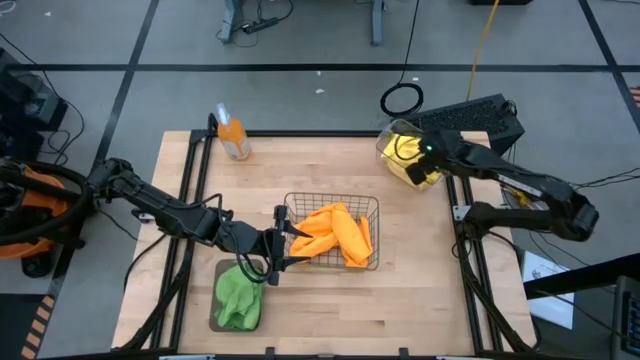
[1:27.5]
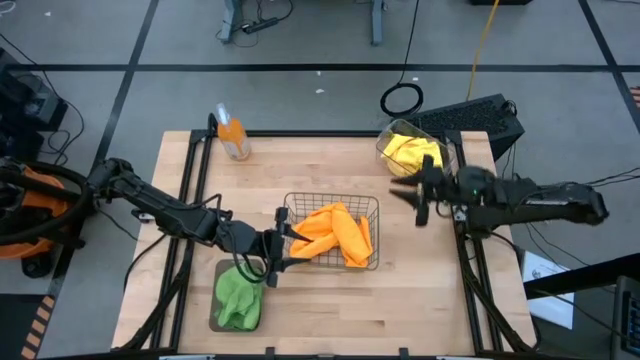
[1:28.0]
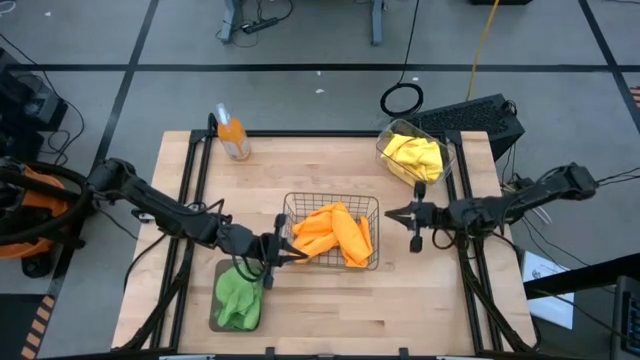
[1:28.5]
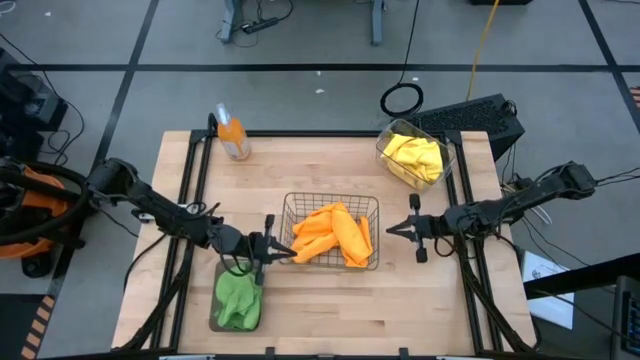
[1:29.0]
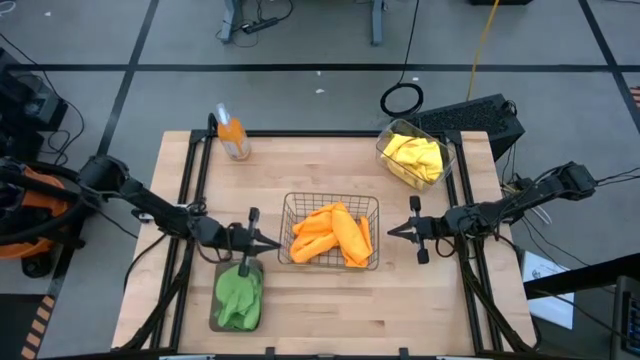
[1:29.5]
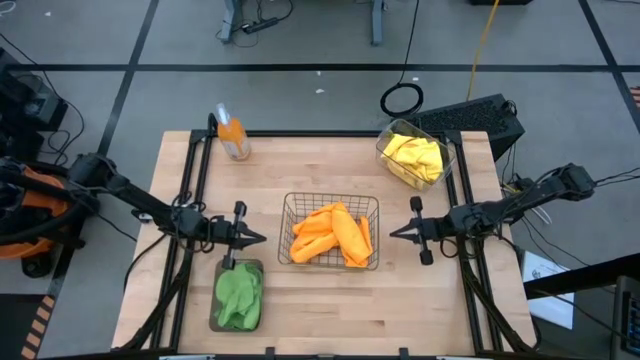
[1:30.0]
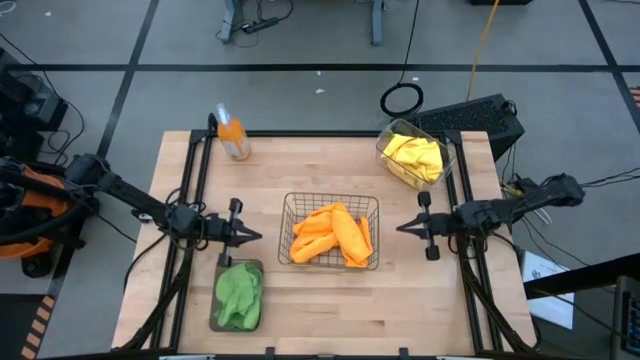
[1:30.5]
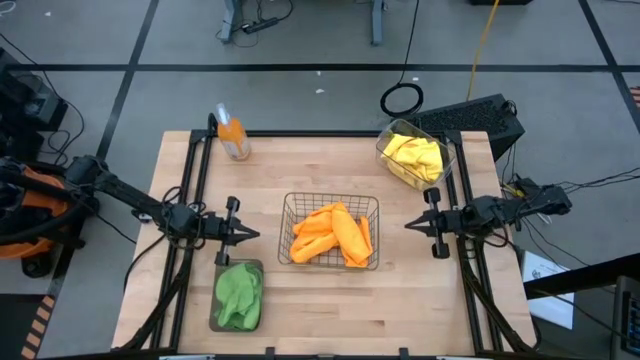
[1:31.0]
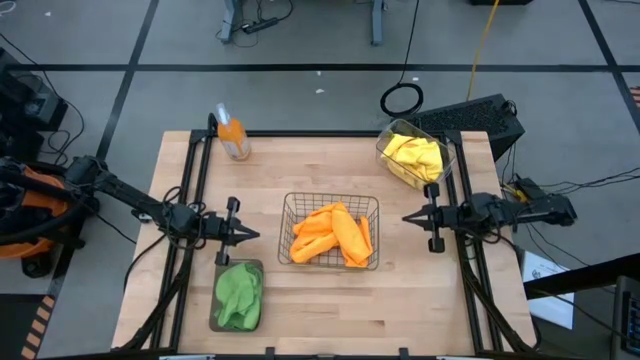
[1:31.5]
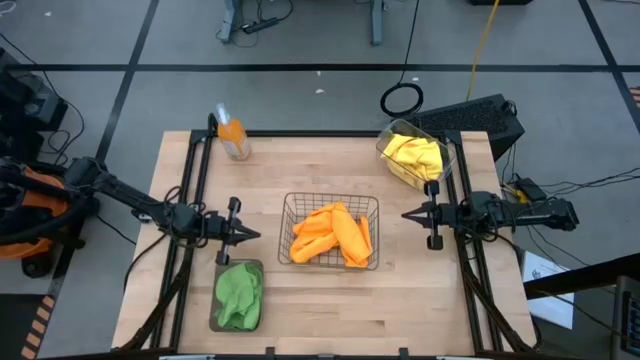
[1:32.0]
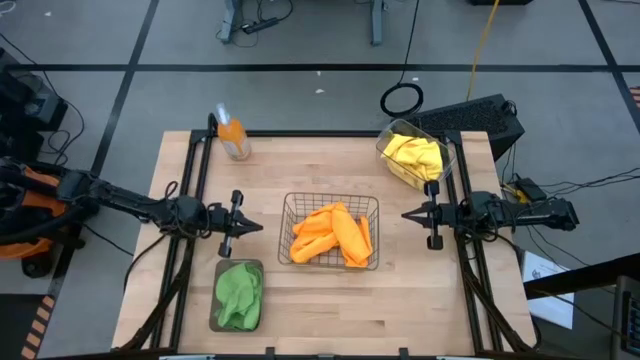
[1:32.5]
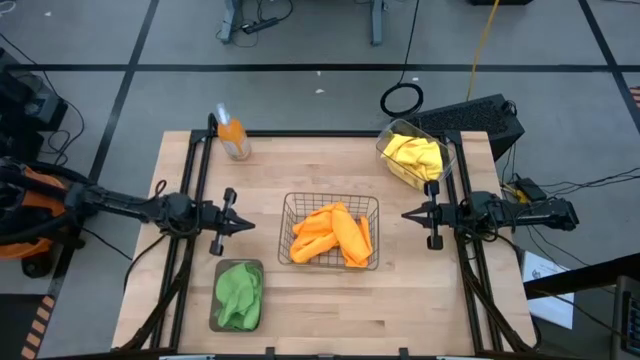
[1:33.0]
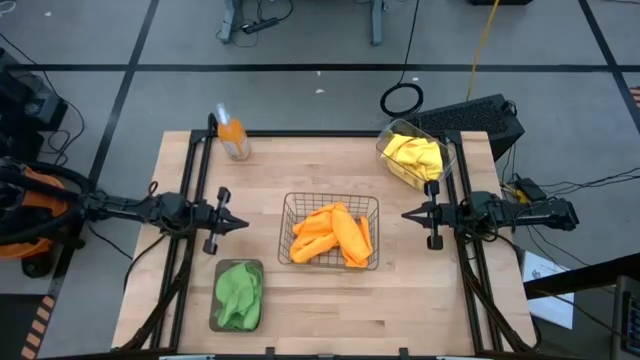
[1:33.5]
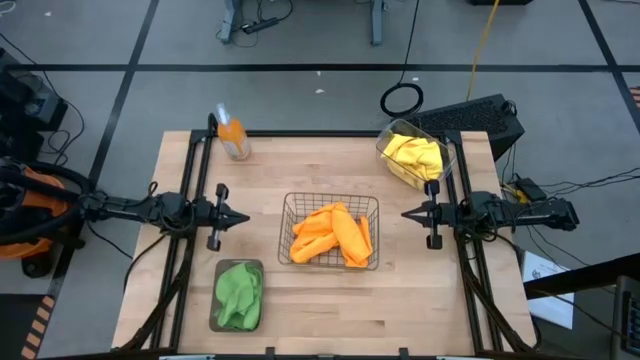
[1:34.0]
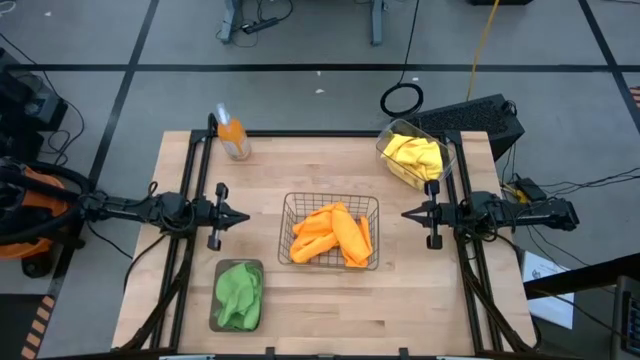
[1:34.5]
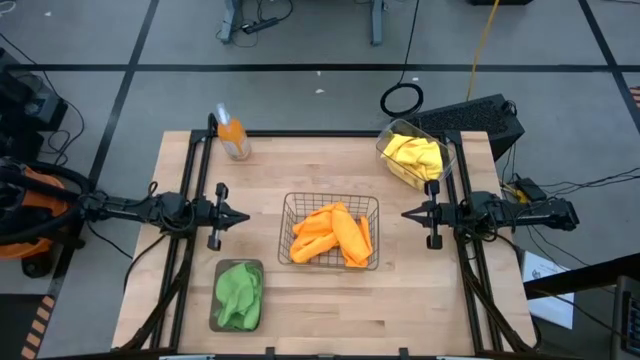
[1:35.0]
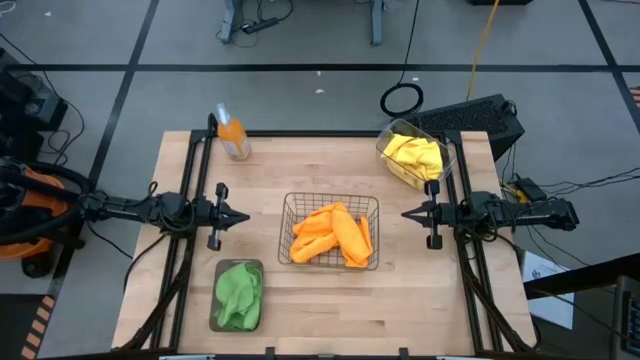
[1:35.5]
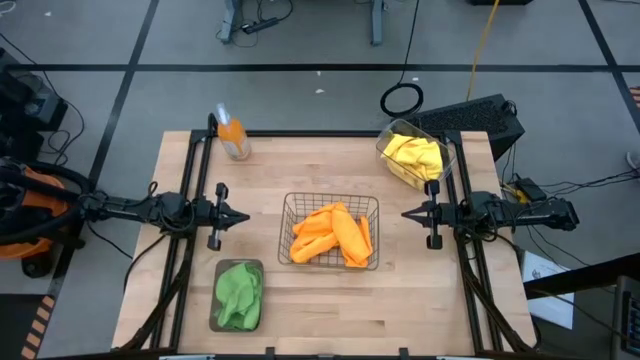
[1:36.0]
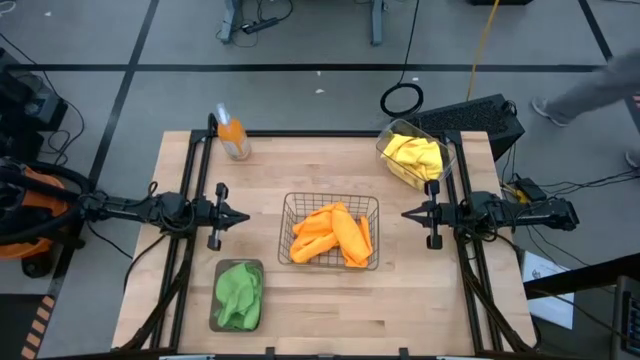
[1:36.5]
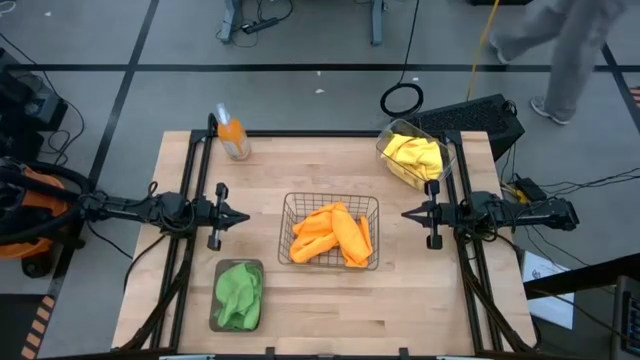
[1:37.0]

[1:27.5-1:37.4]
Task: Sort microfiber towel by color & place in baskets
Return to Home Position

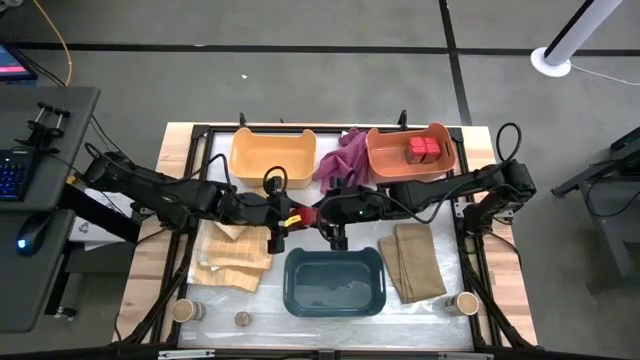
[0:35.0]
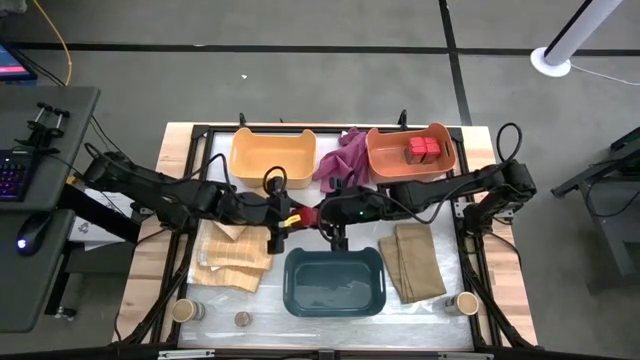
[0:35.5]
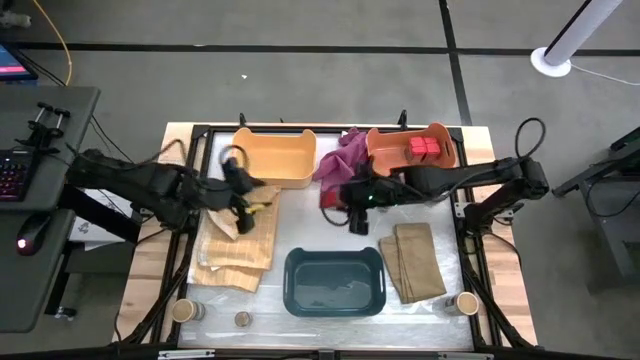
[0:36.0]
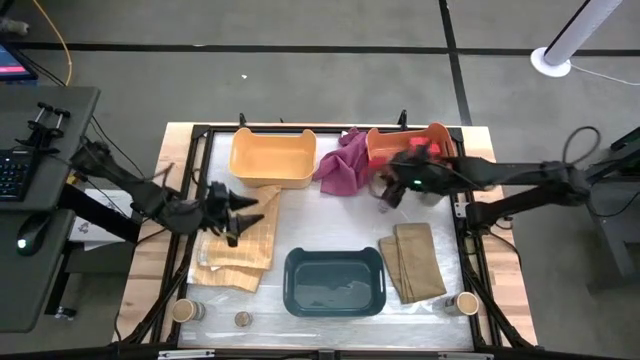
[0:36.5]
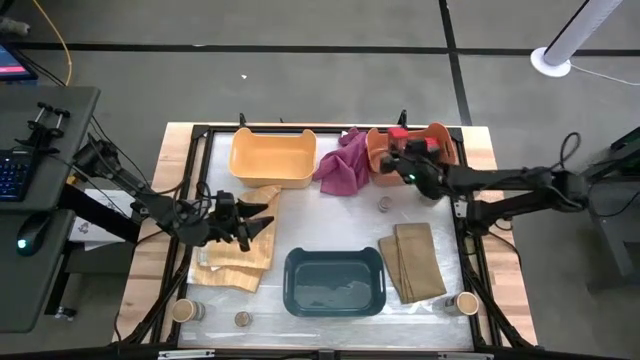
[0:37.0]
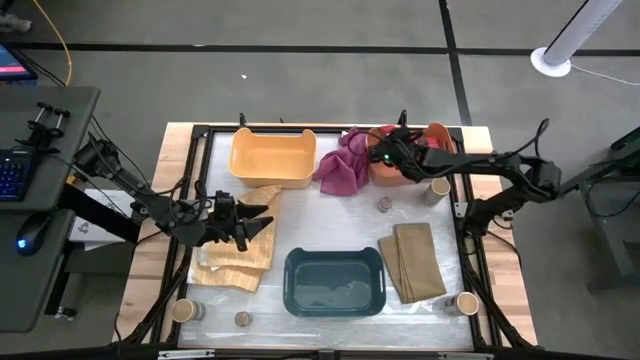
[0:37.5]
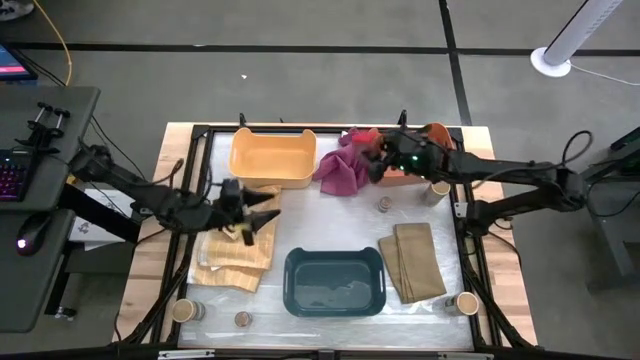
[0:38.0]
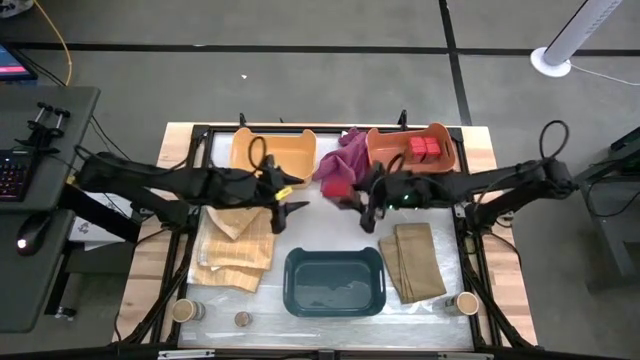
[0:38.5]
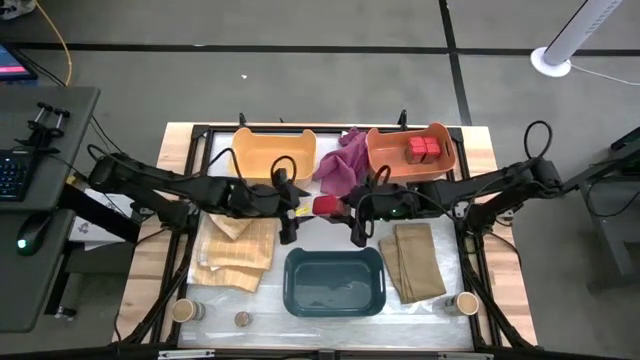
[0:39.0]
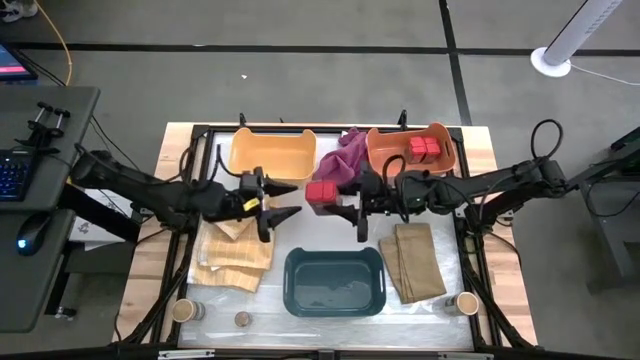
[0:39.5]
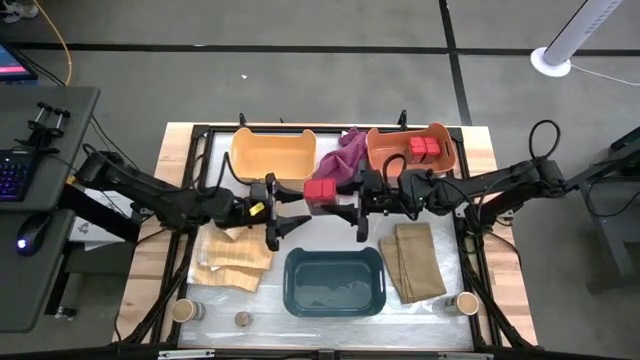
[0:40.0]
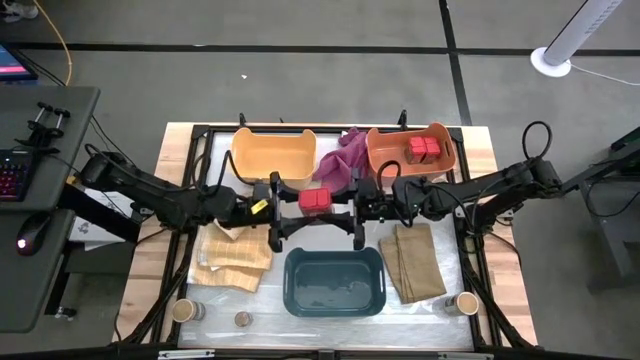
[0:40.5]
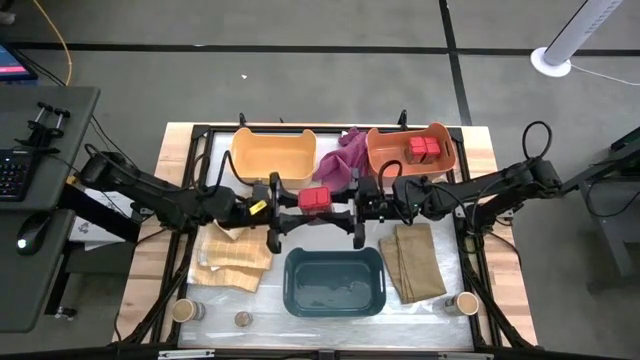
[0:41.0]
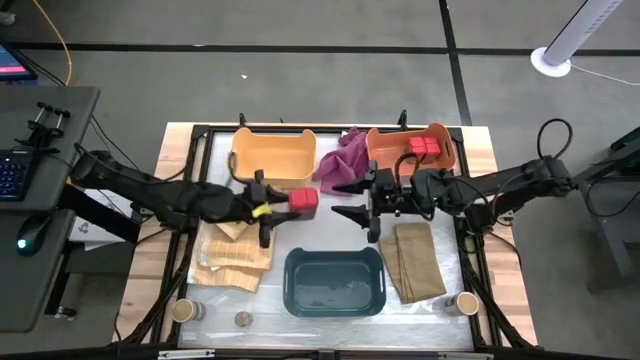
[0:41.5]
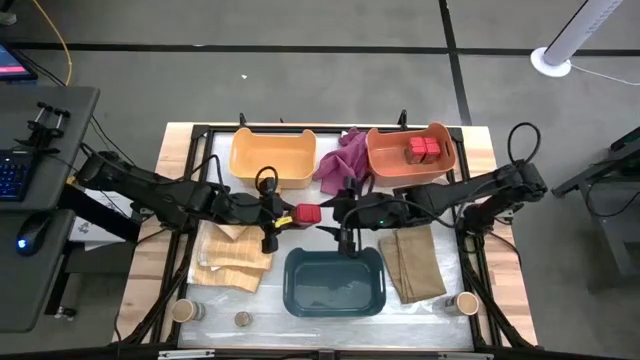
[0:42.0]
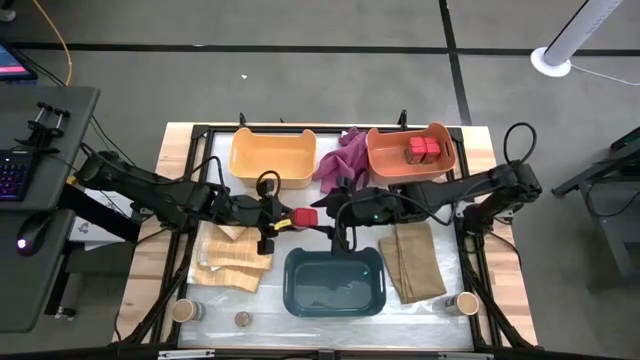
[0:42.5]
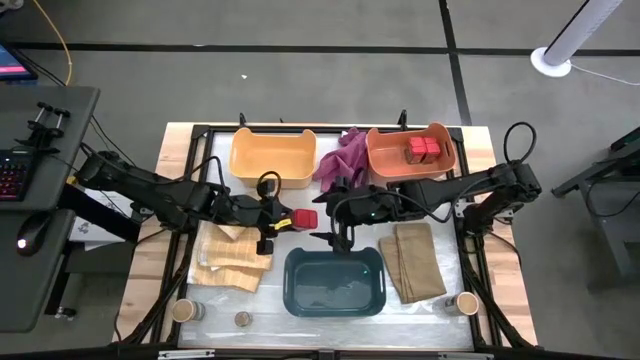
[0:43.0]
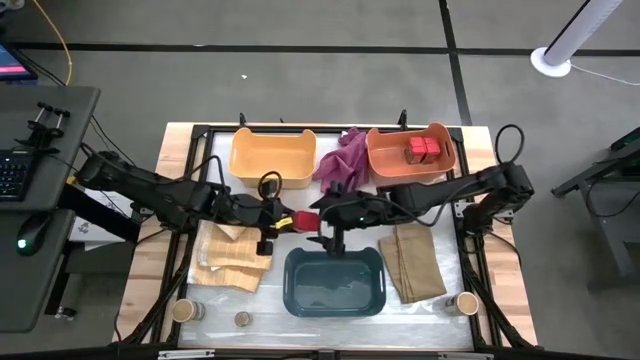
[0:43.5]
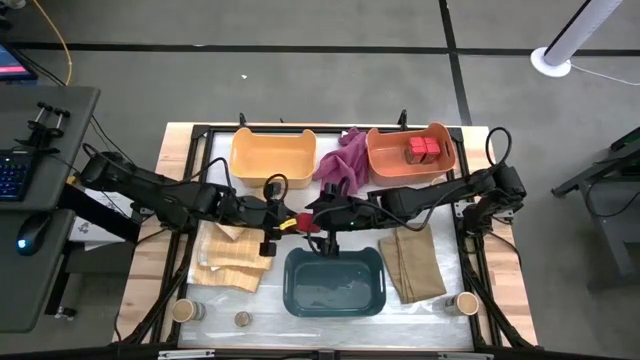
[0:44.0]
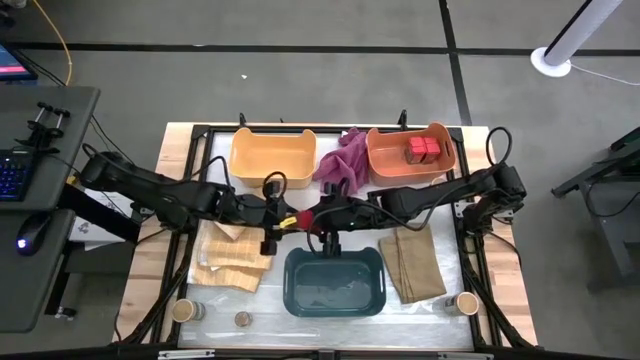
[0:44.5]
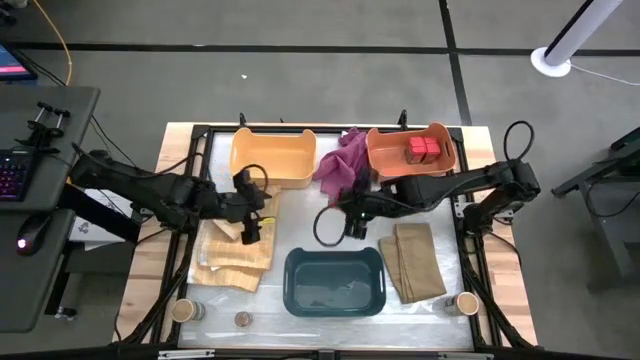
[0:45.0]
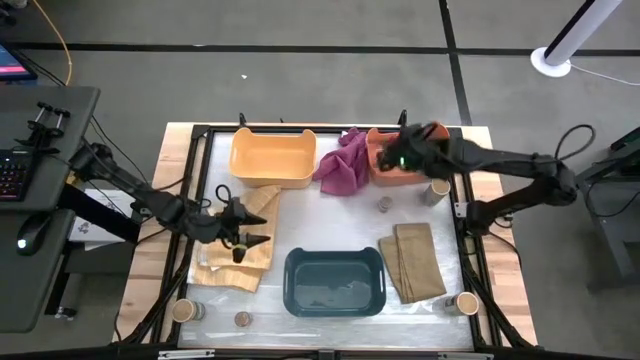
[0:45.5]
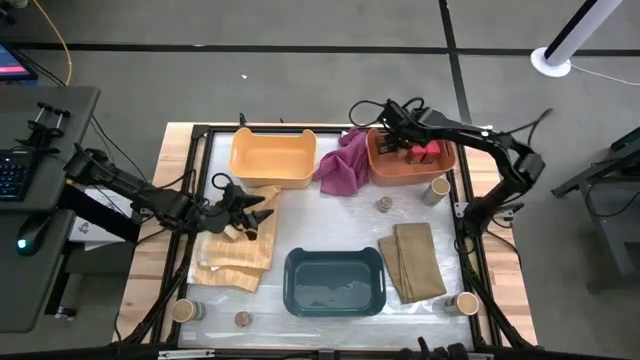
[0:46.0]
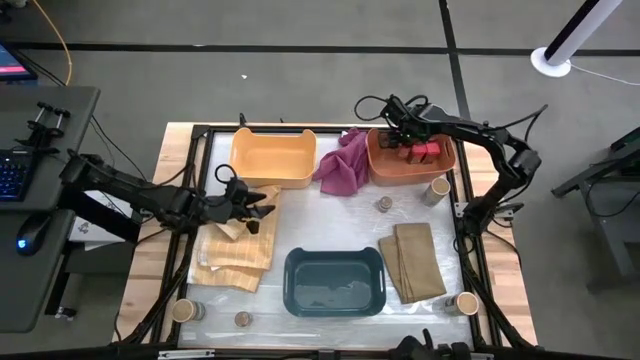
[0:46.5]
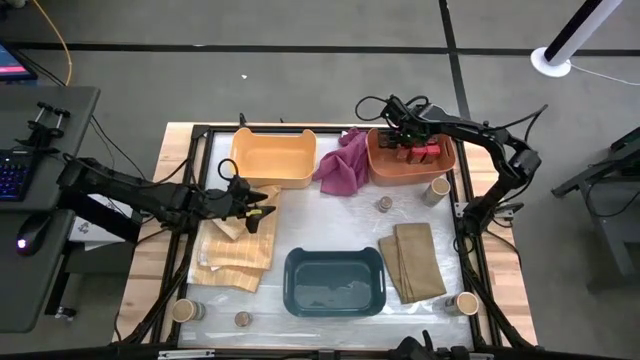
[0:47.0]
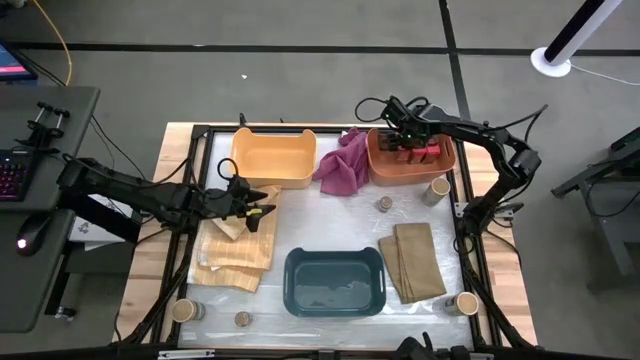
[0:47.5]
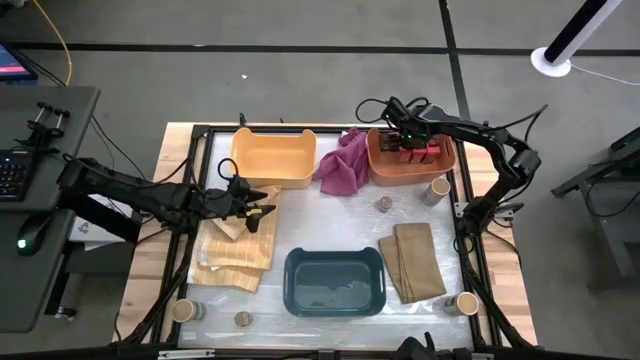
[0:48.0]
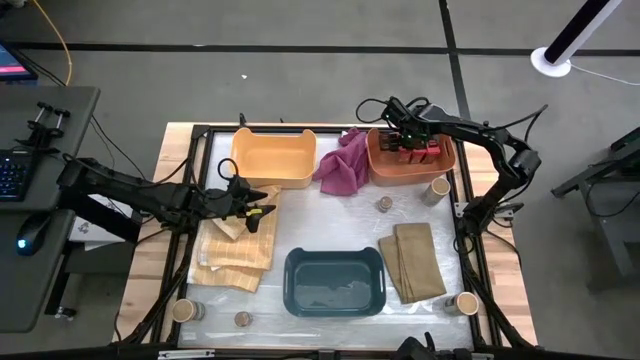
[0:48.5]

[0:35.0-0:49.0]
Task: Sort spices by type
Put the red seasoning can into the orange bin
